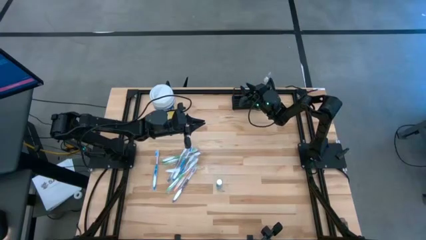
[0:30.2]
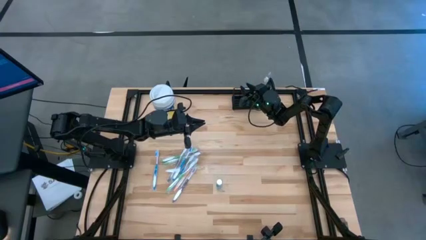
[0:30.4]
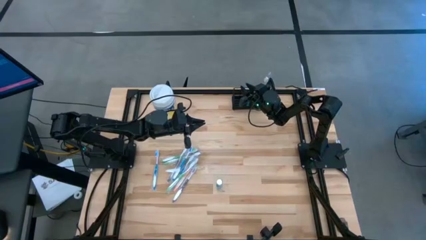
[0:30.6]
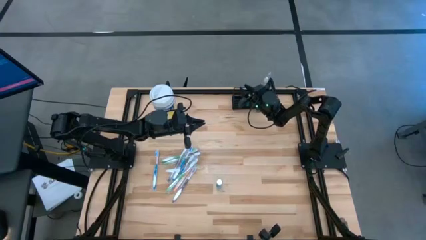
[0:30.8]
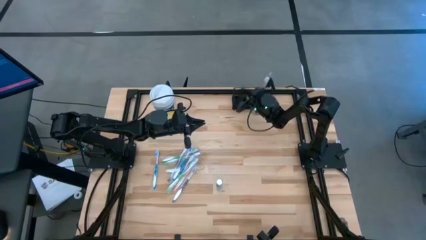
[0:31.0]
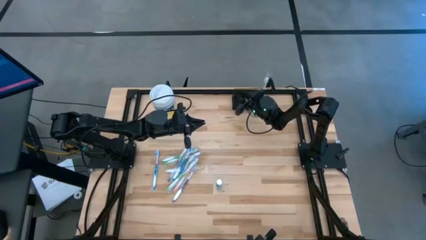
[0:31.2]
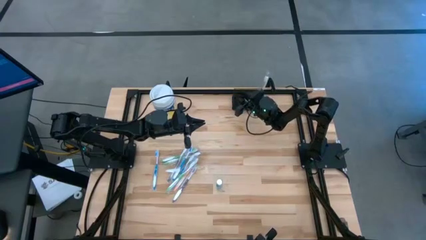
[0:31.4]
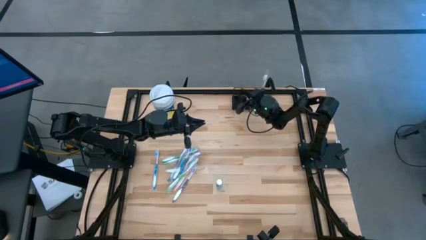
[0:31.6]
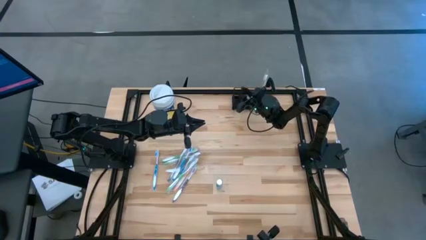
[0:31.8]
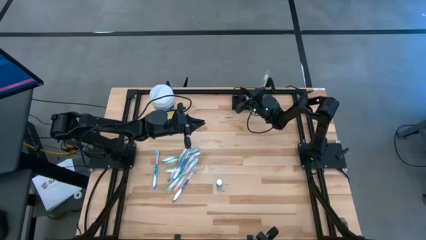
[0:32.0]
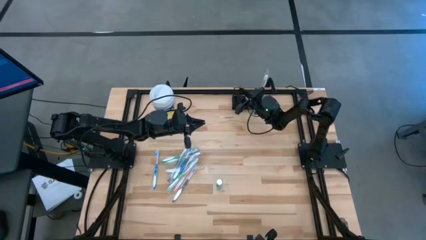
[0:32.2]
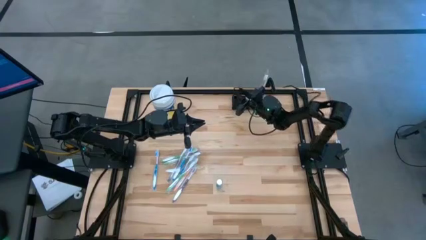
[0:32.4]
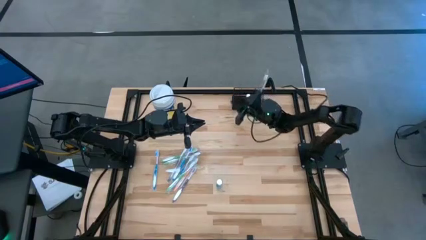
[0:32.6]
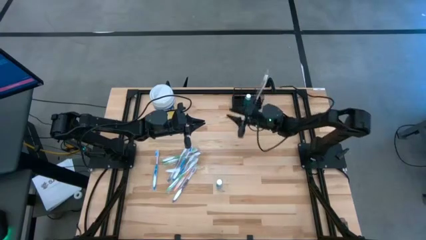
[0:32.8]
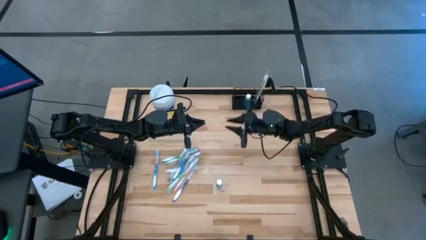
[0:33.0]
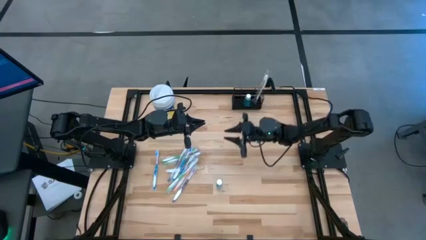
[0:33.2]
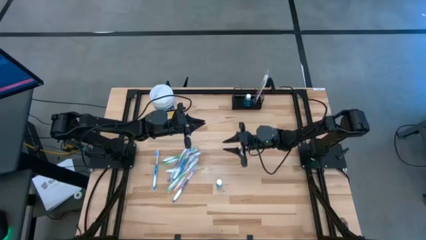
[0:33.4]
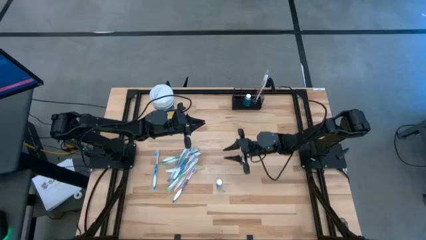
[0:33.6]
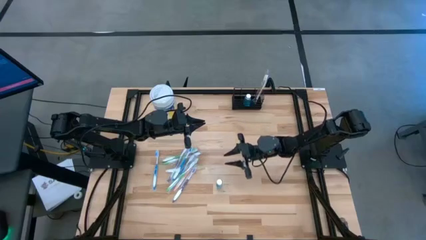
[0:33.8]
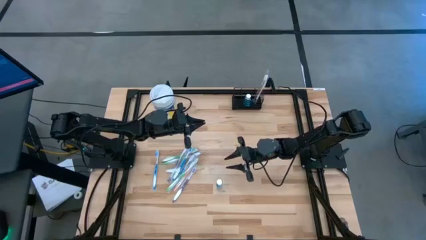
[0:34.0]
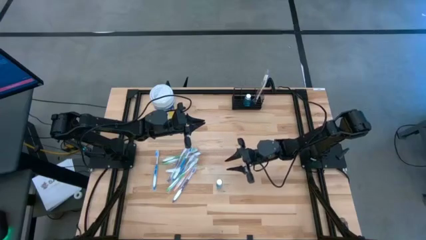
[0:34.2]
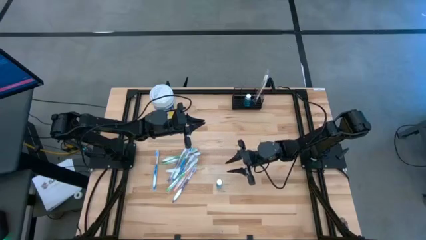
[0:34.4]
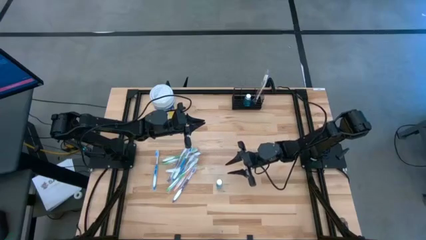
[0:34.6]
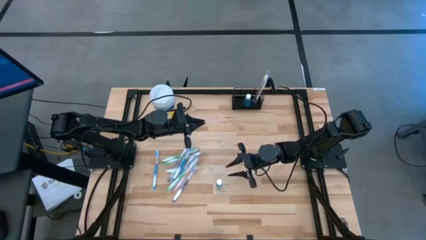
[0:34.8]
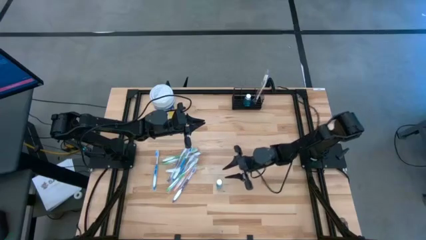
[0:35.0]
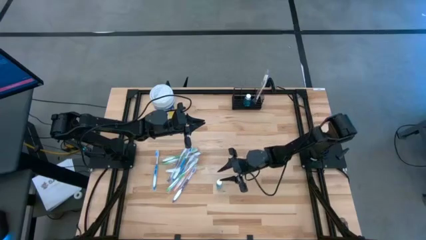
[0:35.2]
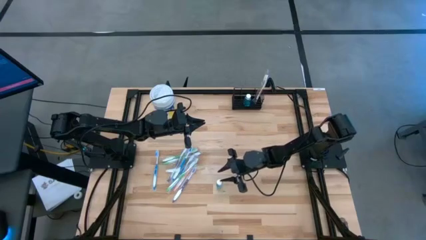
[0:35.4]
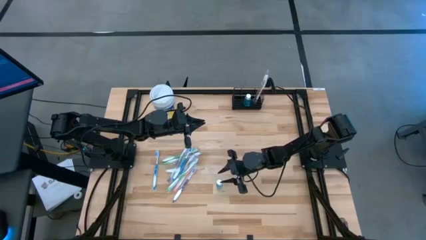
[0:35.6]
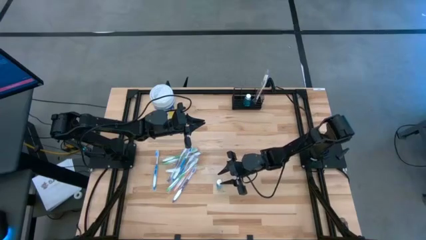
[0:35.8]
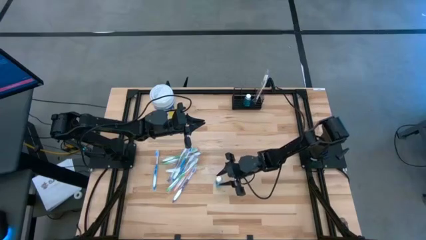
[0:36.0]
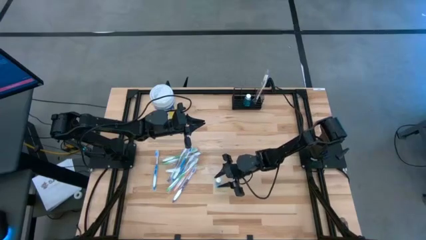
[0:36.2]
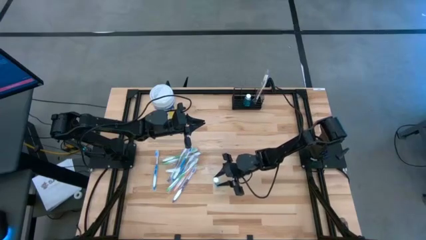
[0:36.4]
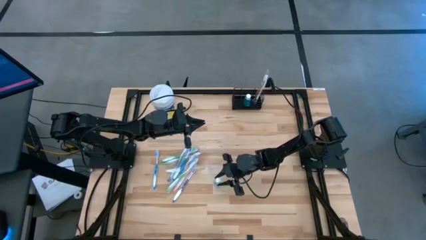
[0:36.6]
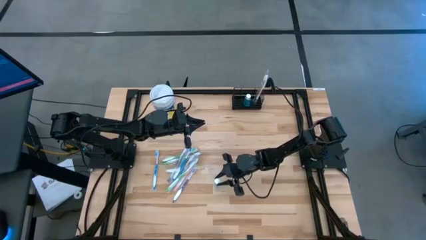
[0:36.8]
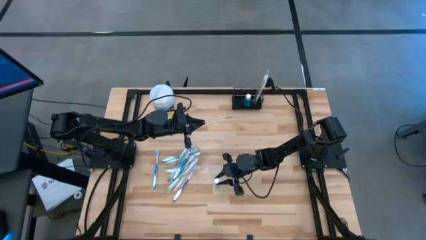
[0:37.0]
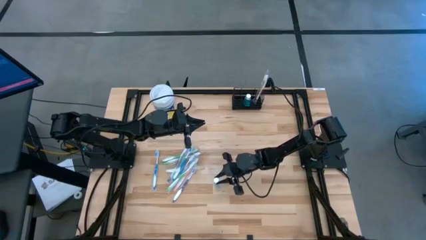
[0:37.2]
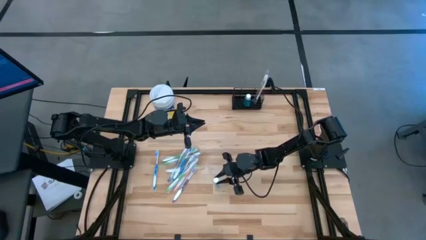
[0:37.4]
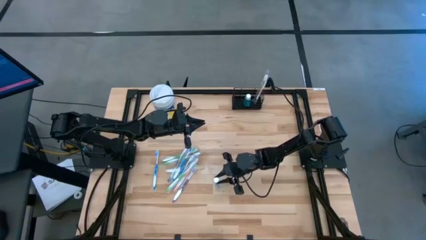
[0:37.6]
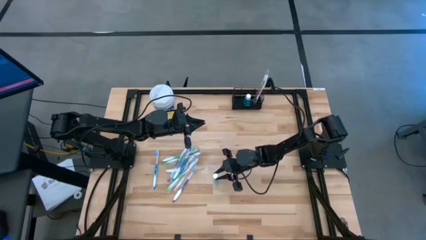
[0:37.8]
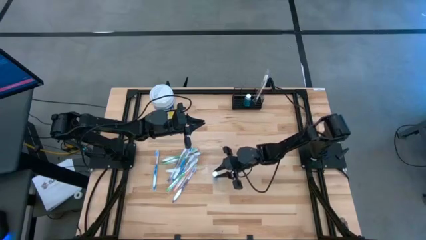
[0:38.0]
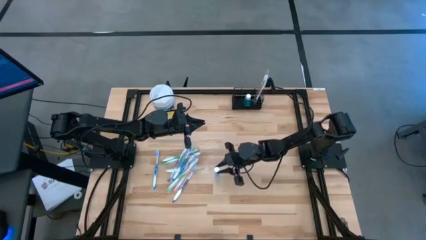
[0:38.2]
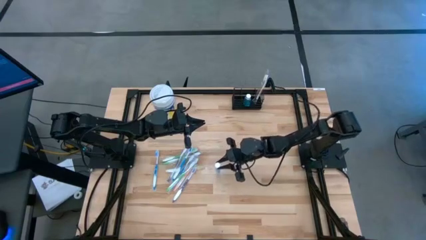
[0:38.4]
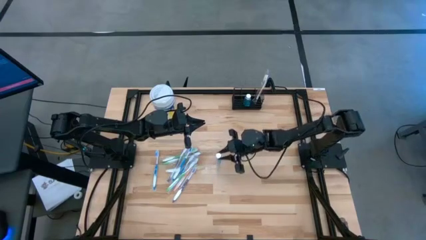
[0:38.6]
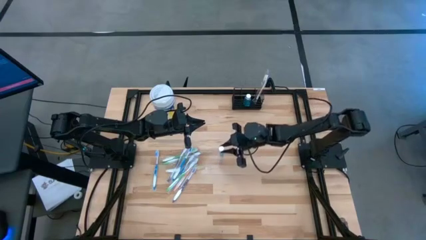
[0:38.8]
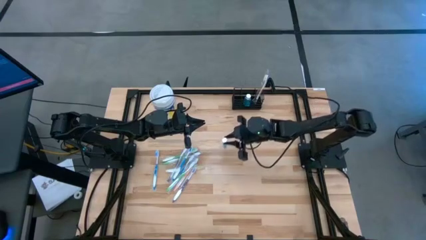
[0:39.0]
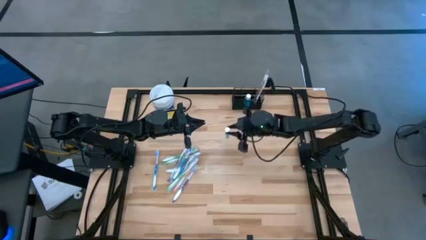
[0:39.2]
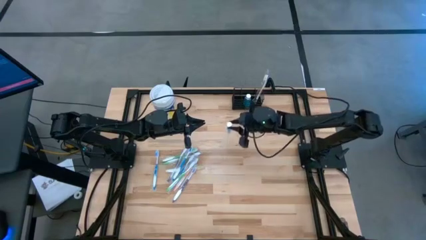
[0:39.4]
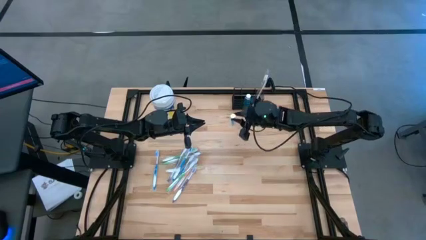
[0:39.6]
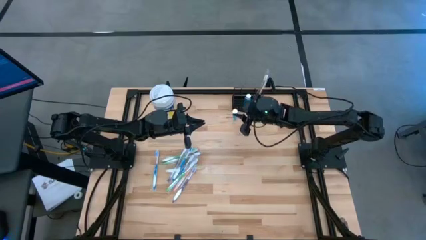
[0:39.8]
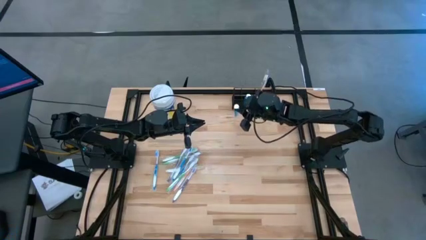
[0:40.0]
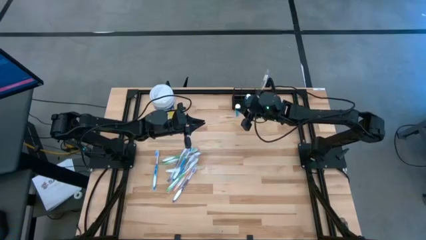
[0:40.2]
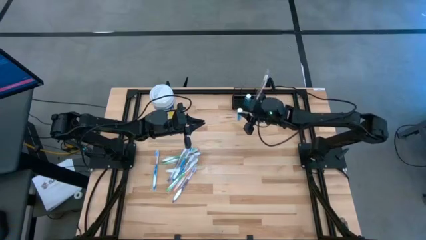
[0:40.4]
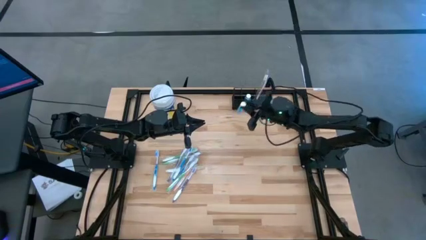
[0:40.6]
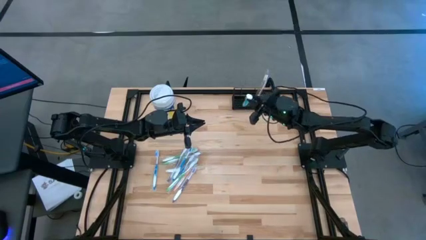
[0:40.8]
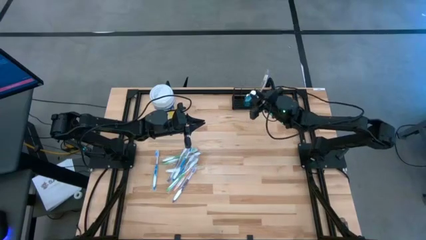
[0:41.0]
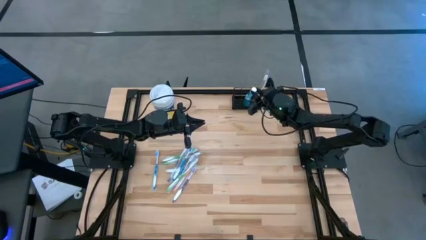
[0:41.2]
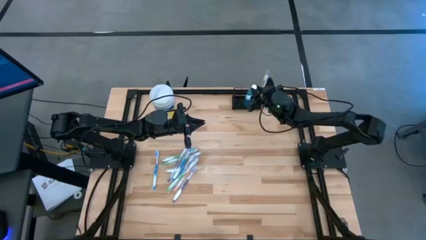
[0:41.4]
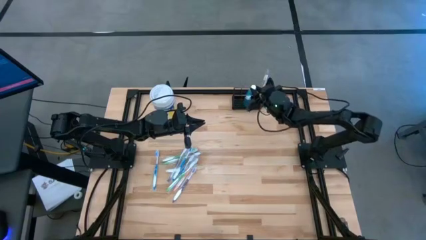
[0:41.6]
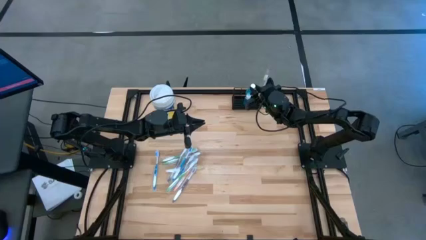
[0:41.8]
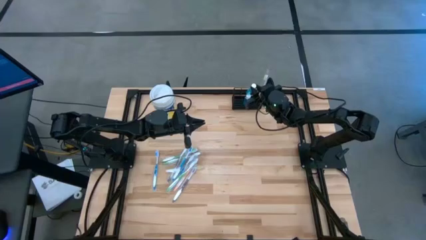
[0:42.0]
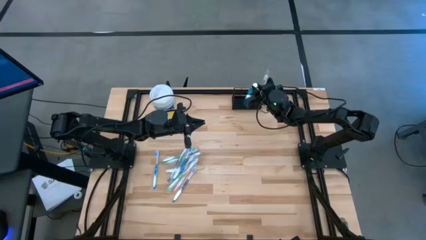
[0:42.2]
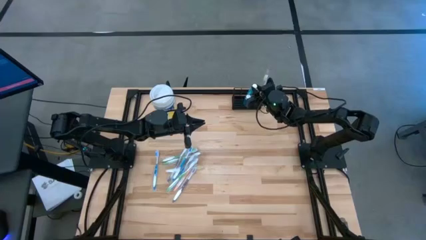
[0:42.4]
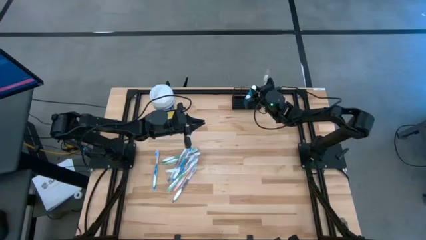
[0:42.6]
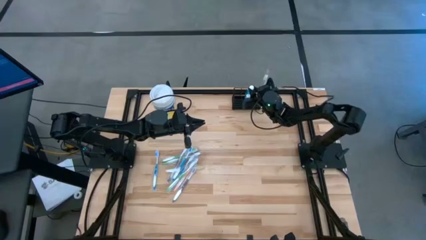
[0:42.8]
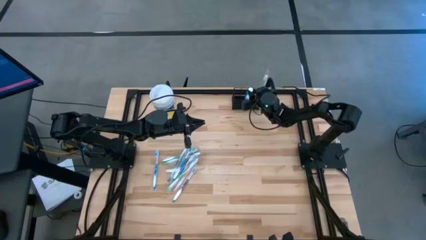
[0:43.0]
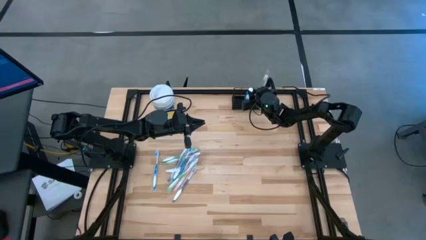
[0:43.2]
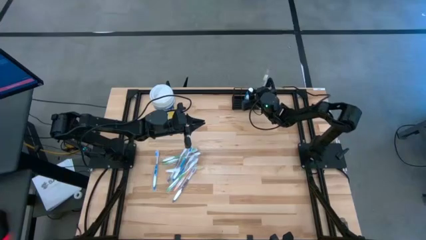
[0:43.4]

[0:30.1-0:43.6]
Task: Pick & Place toothbrushing station
Put the mouthwash into the black mesh organizer
